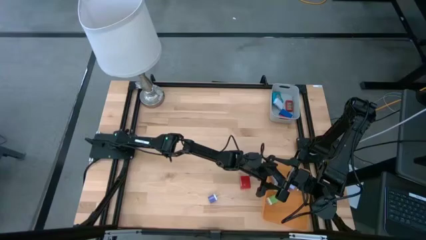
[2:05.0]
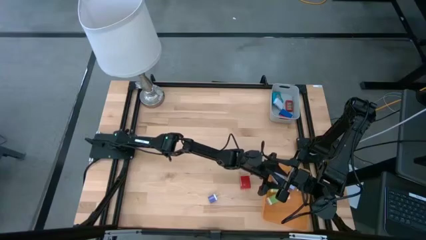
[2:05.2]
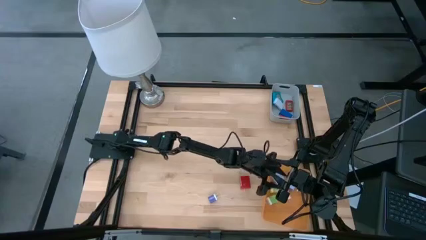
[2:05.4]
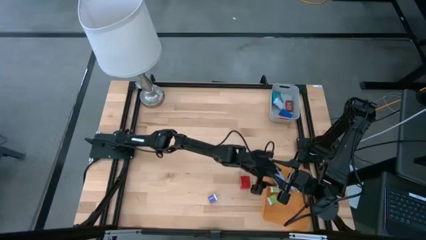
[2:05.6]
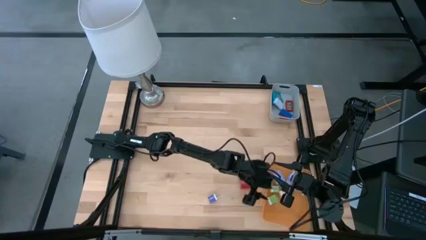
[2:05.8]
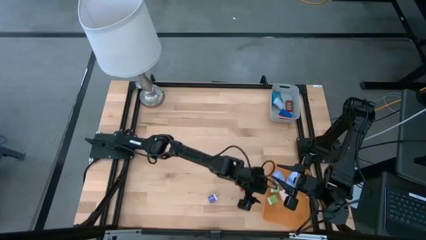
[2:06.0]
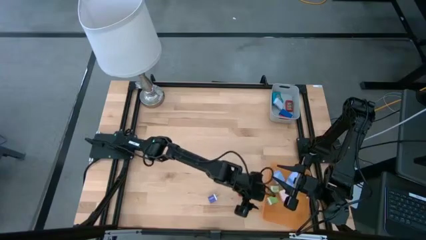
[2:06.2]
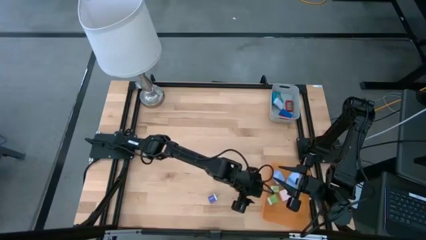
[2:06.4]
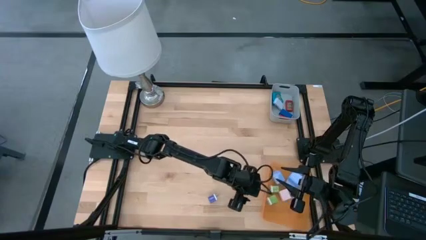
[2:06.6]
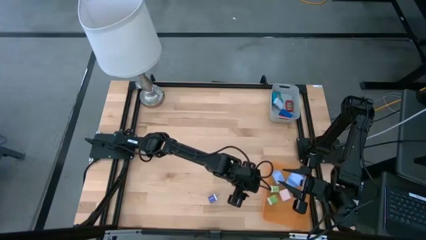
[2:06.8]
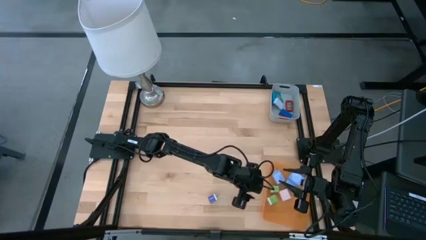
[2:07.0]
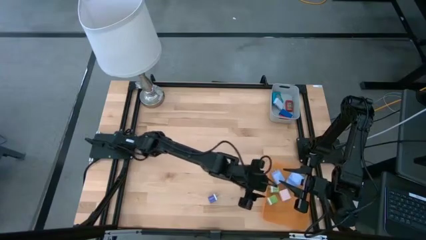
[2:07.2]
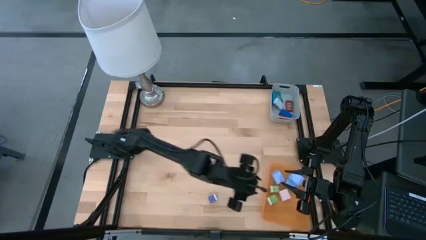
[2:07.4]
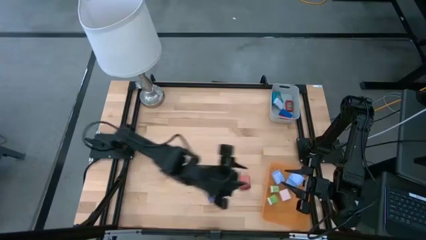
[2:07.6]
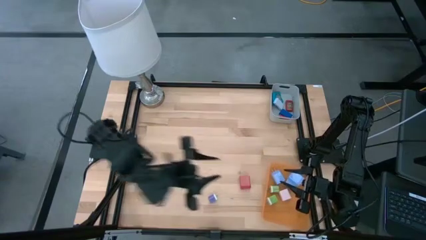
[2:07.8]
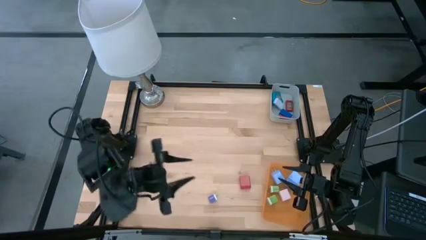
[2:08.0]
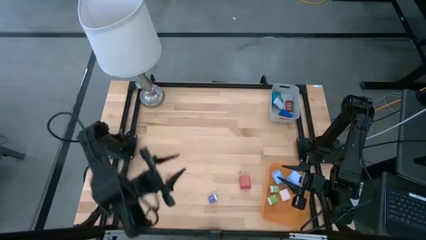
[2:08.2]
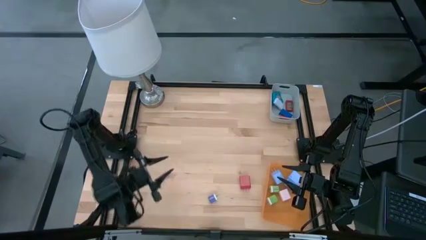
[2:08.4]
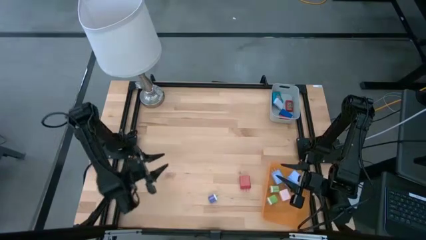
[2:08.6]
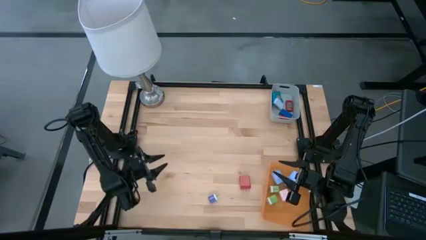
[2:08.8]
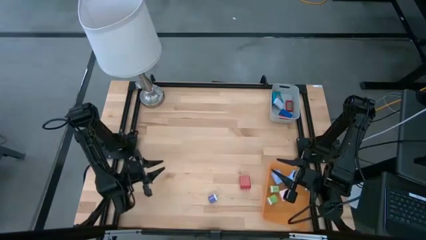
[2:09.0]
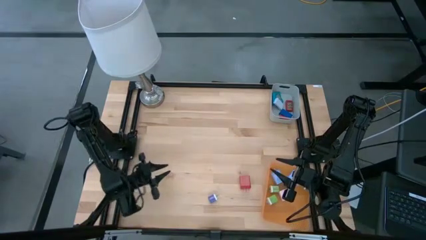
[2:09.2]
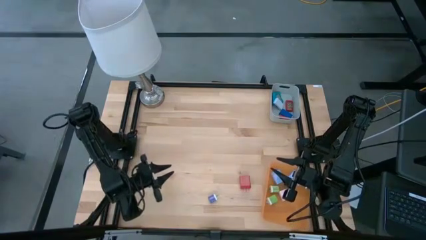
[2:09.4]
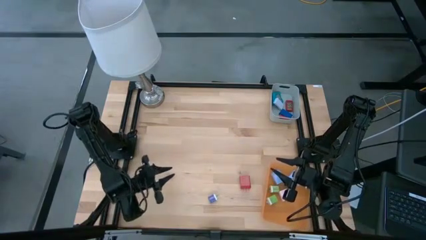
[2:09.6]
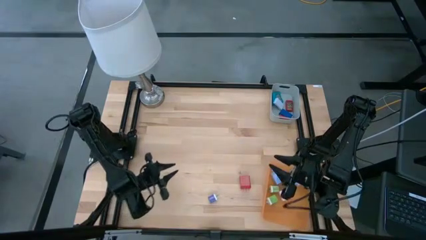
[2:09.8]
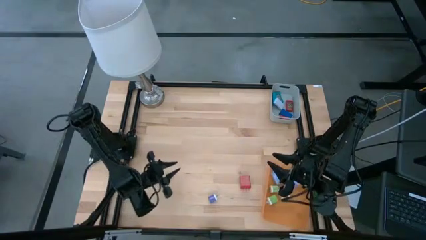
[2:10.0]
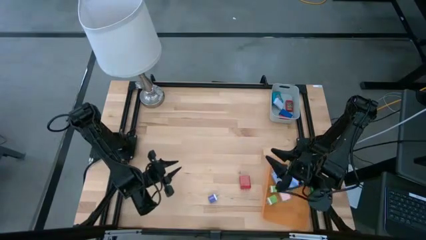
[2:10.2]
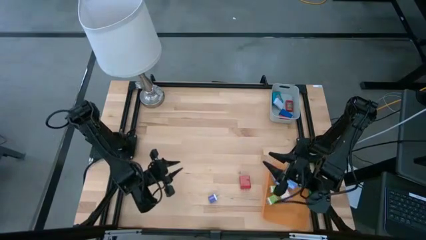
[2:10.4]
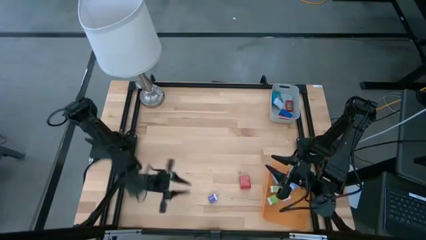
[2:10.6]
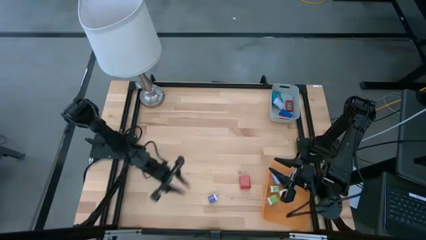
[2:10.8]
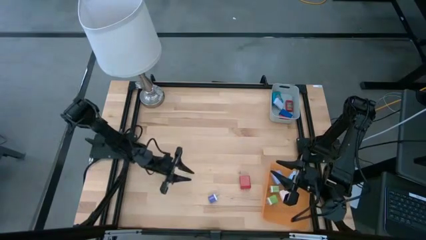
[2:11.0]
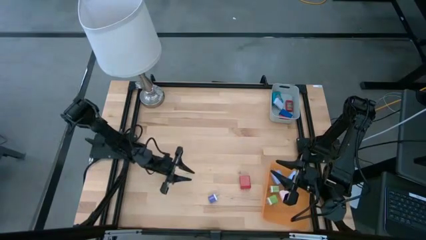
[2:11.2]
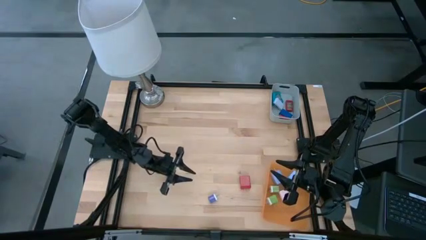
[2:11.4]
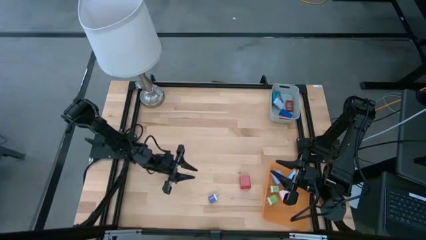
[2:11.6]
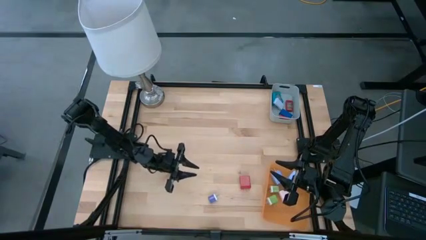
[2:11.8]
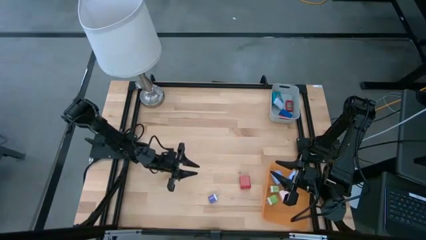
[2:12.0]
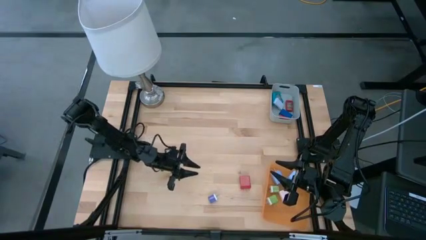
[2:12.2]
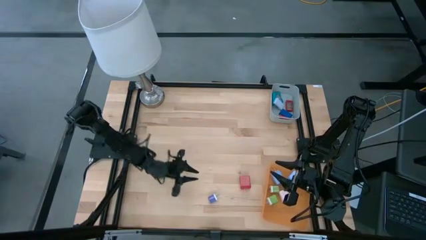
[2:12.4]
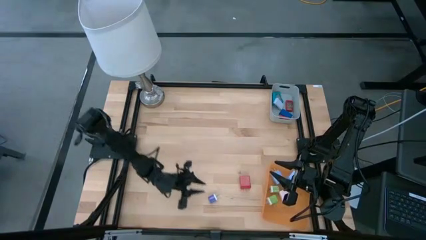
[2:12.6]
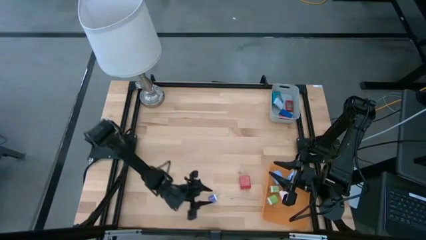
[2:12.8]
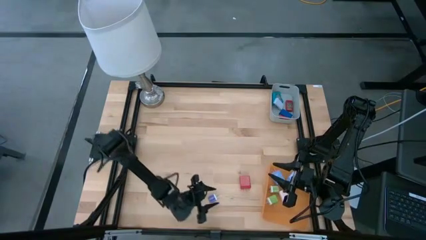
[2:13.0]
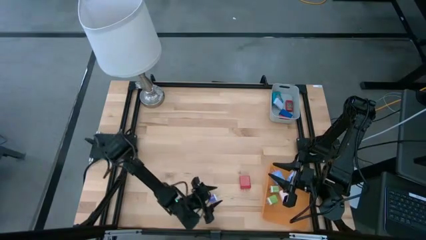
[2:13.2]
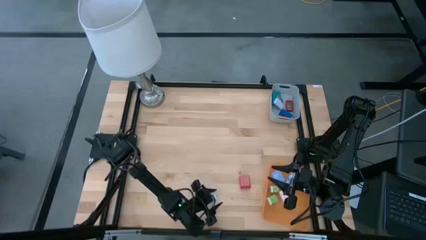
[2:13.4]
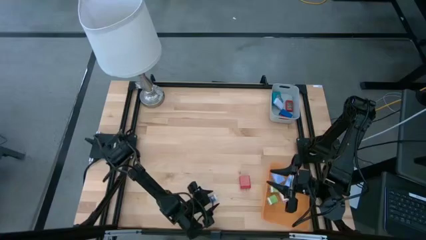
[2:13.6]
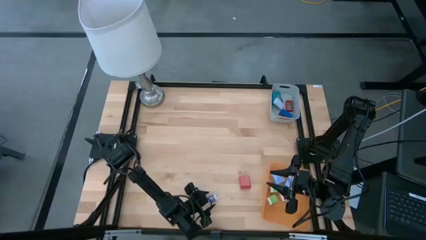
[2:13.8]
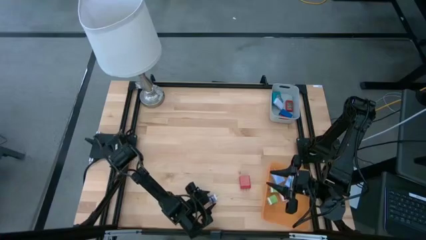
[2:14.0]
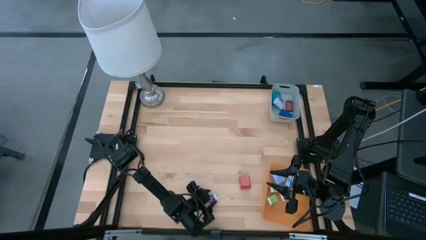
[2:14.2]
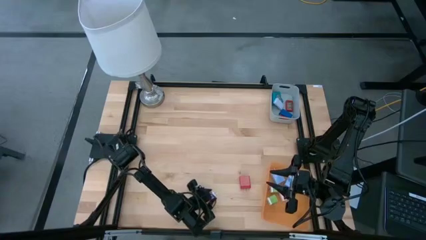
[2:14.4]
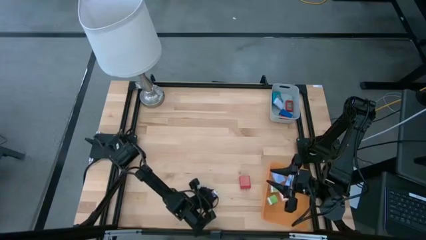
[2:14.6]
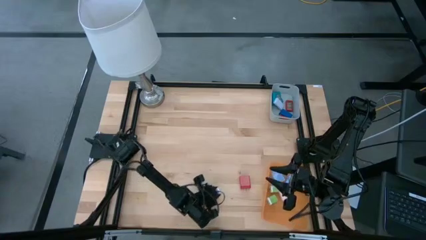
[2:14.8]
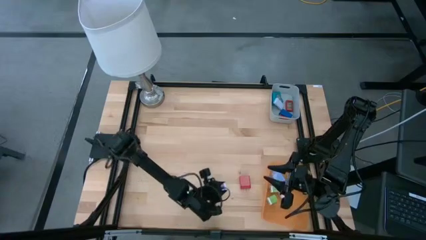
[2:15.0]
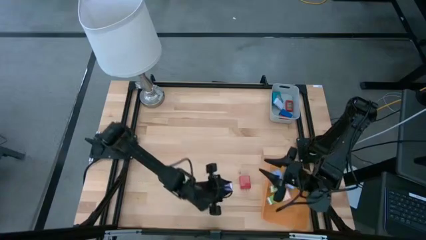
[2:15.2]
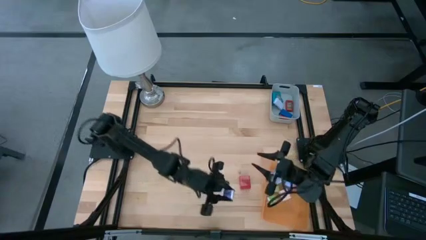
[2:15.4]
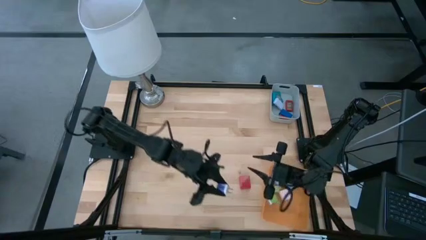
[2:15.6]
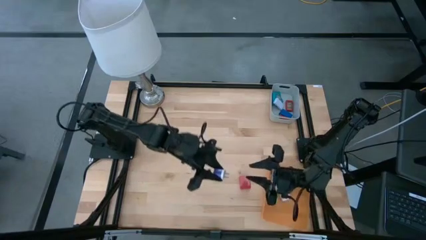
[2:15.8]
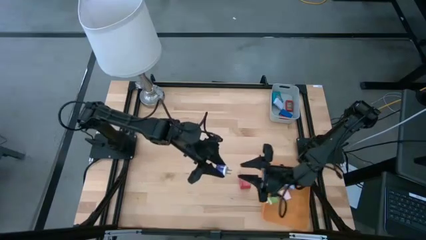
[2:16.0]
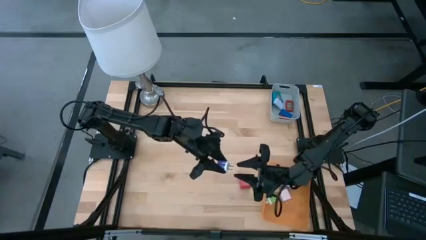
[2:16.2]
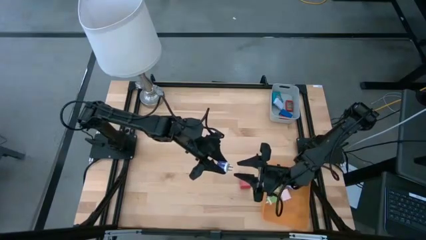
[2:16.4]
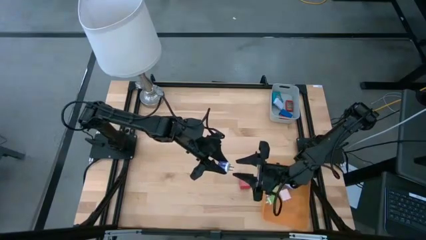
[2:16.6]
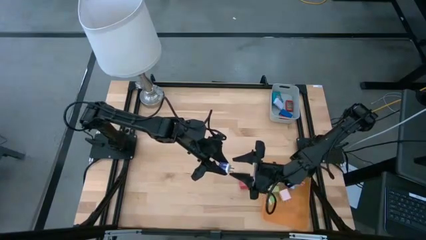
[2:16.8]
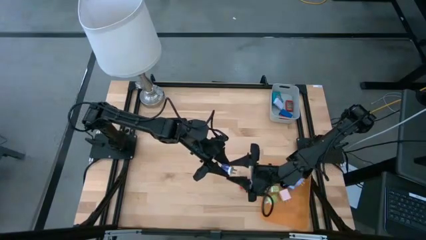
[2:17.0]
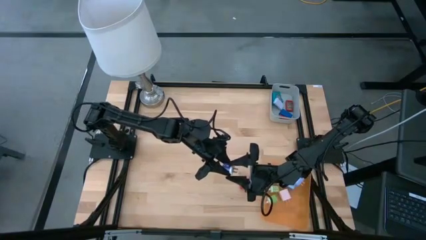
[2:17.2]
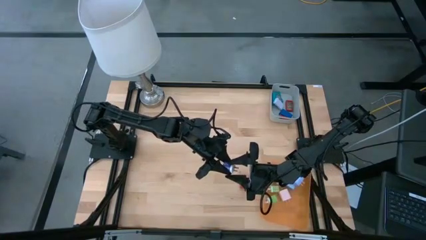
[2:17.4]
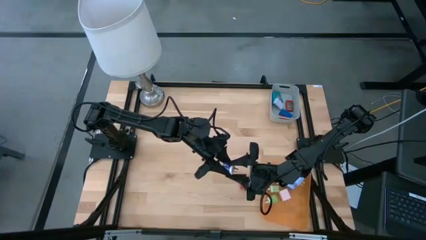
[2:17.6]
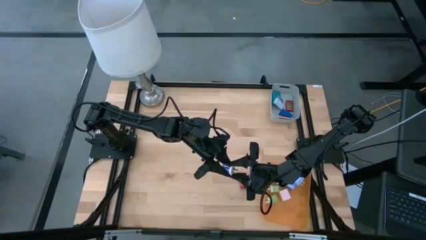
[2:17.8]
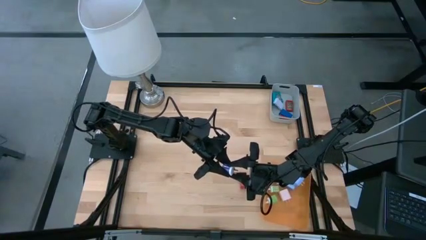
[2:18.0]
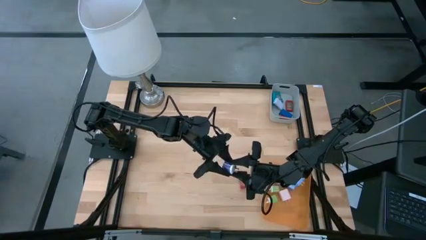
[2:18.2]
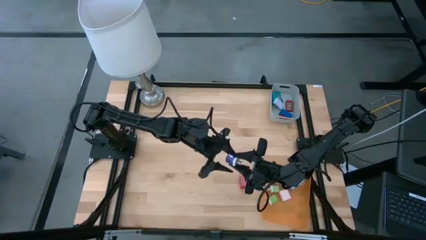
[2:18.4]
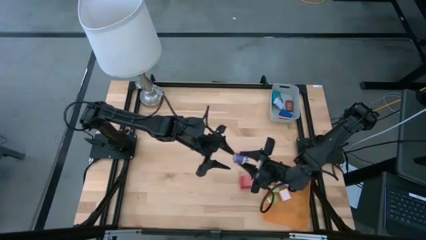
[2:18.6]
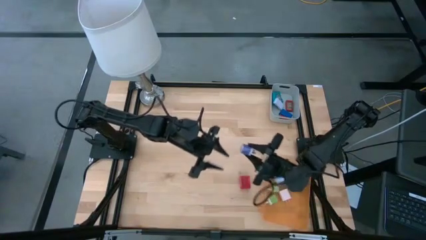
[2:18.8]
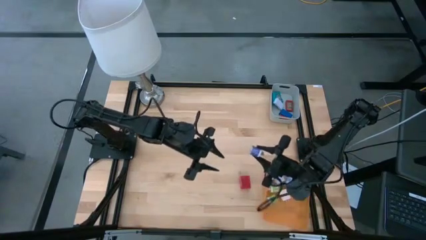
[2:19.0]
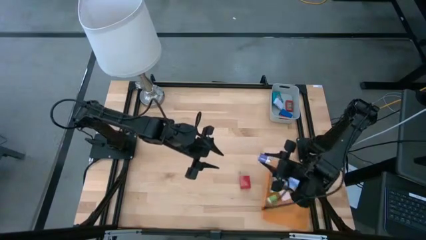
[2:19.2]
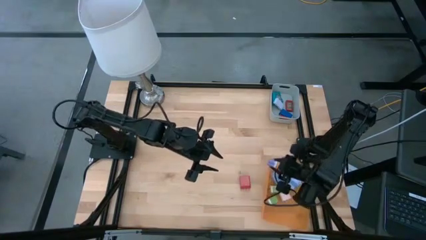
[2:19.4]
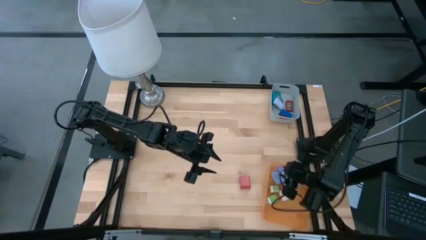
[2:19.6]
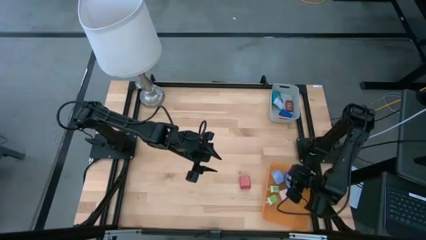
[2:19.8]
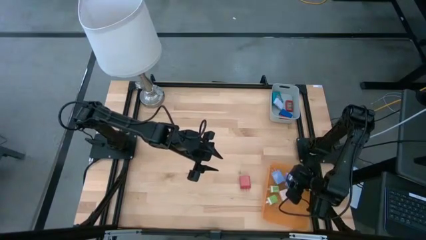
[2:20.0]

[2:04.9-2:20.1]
Task: Pick & Place Office items
Put the violet charger adapter into the orange bin

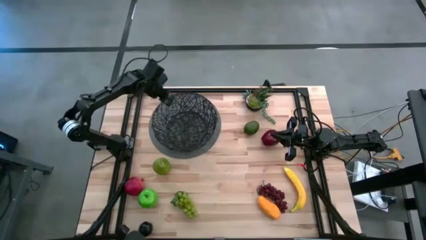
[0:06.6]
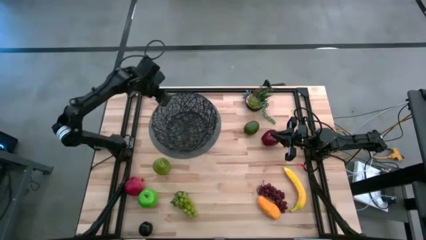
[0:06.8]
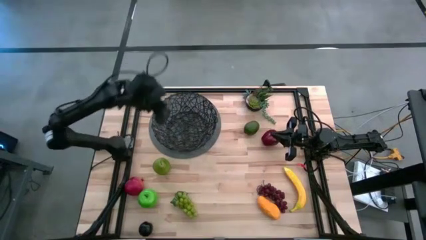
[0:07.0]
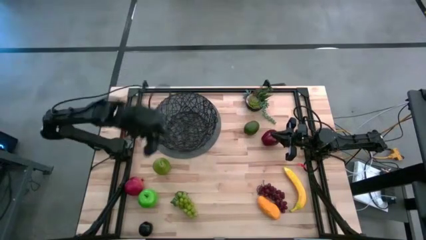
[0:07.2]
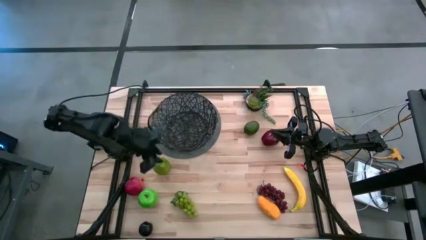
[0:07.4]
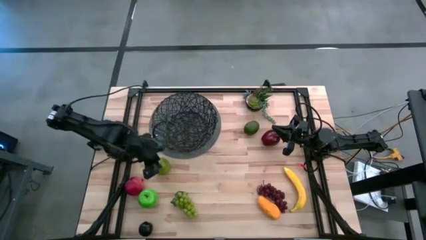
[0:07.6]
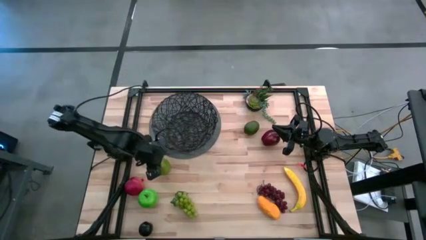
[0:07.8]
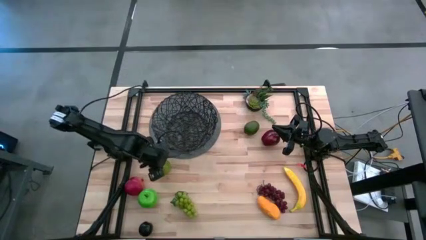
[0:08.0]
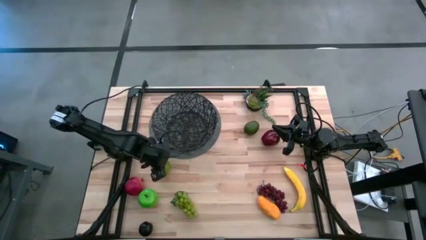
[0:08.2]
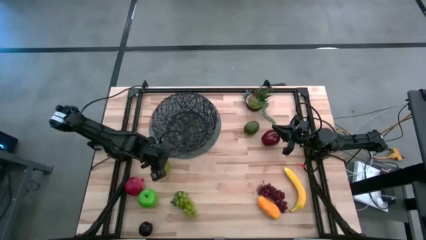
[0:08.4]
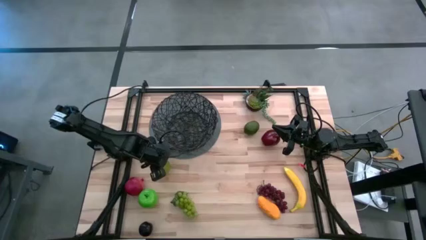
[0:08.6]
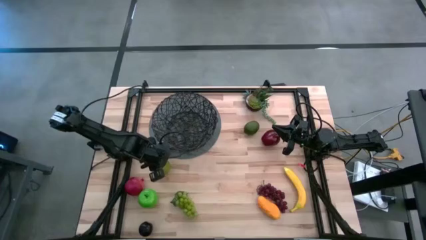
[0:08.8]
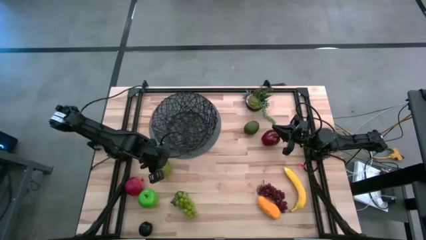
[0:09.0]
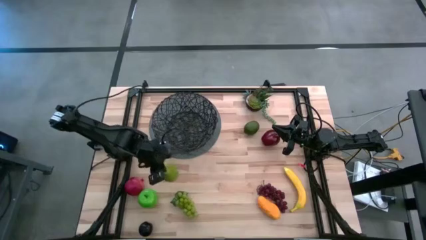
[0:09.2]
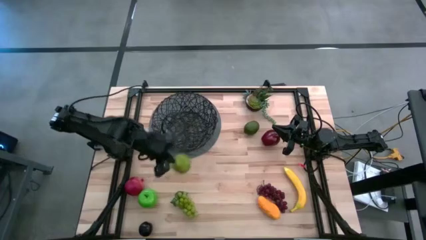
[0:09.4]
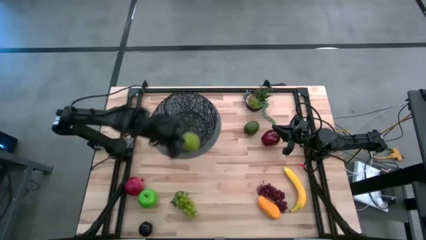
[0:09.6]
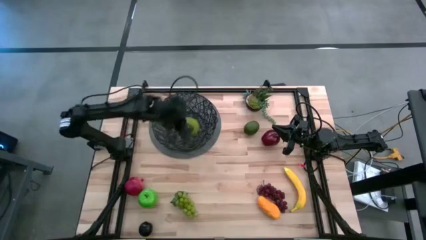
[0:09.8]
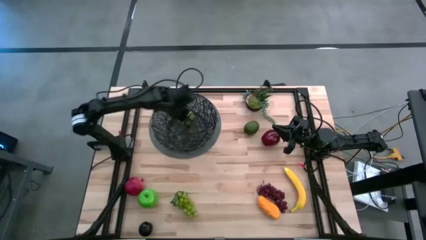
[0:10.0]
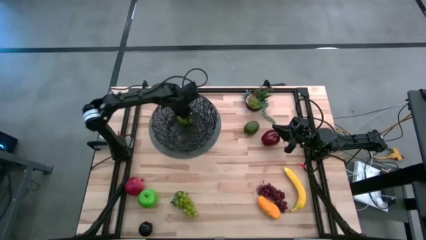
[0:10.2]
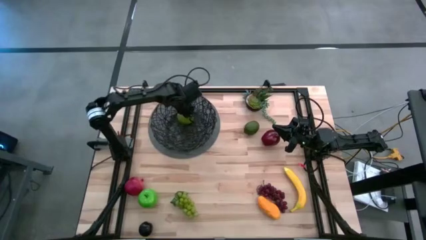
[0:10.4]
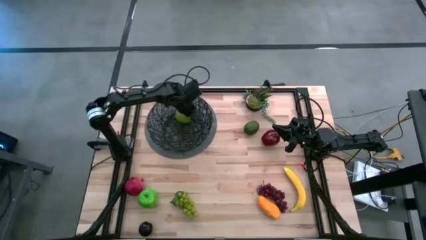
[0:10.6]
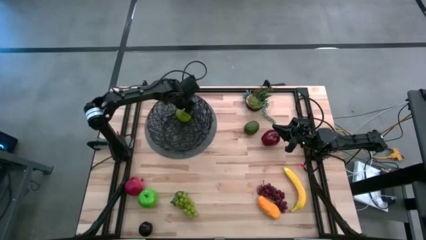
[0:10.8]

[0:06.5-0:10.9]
Task: Build produce basket
Put the green pear into the black wire basket
